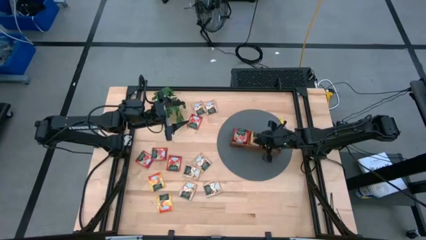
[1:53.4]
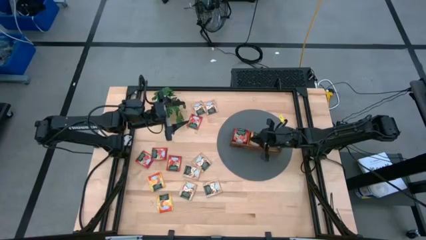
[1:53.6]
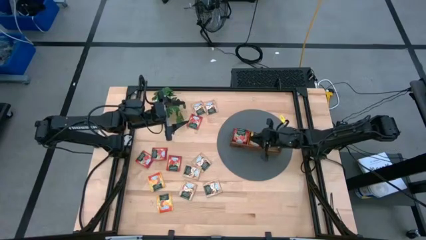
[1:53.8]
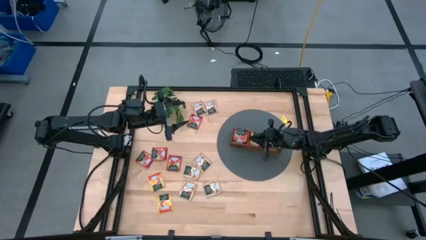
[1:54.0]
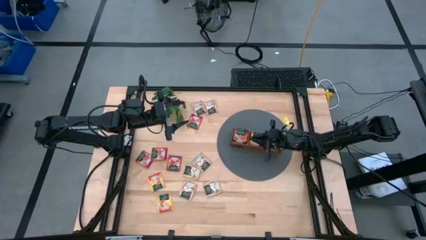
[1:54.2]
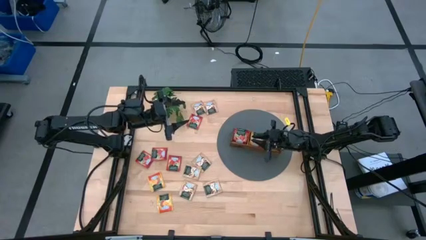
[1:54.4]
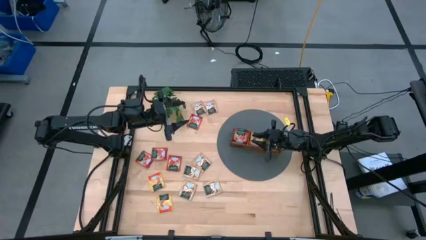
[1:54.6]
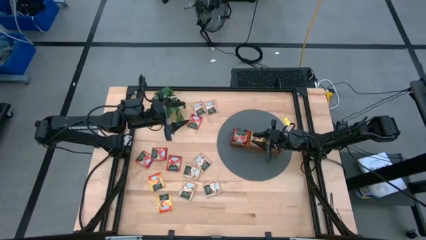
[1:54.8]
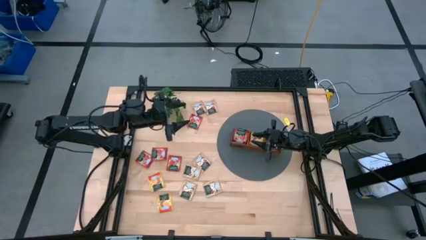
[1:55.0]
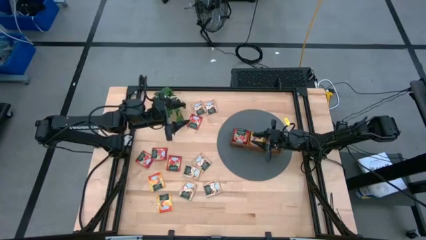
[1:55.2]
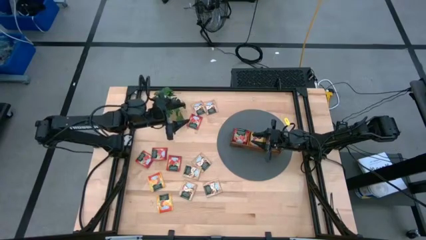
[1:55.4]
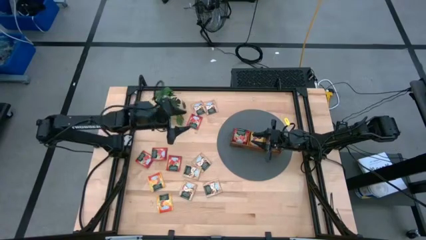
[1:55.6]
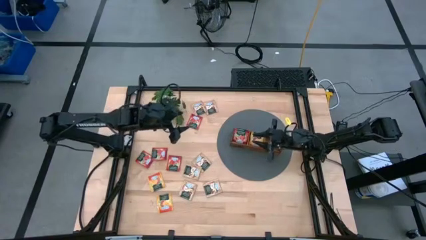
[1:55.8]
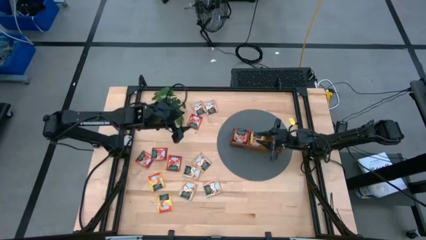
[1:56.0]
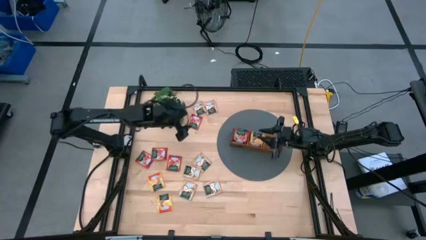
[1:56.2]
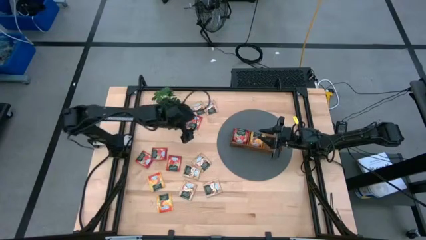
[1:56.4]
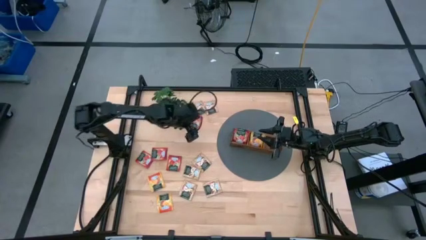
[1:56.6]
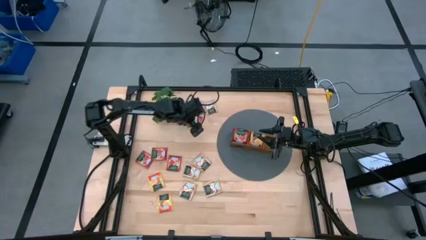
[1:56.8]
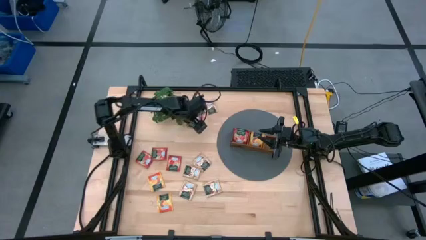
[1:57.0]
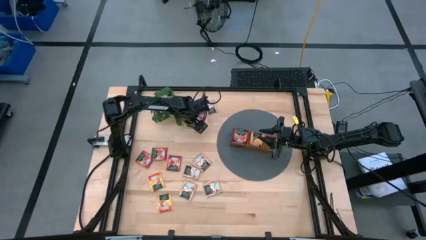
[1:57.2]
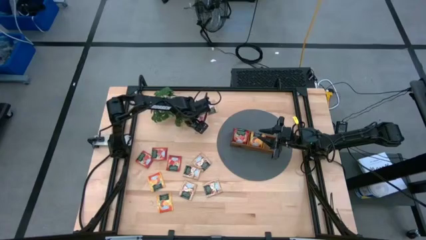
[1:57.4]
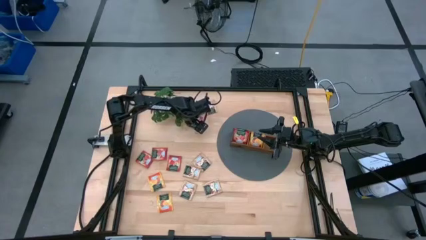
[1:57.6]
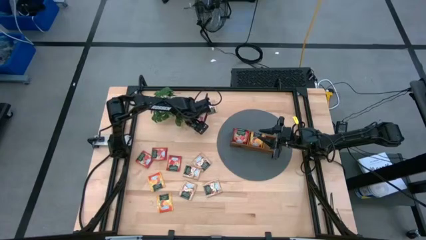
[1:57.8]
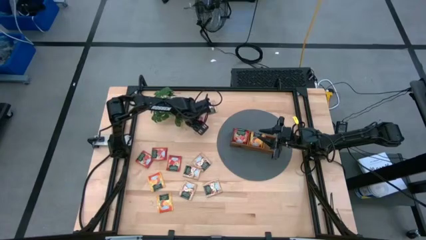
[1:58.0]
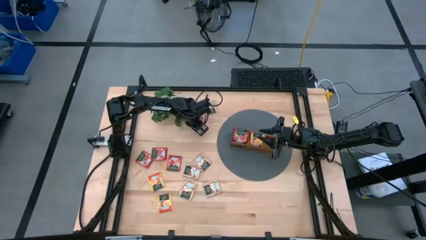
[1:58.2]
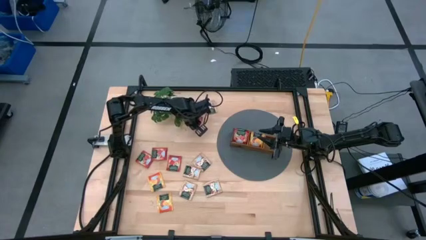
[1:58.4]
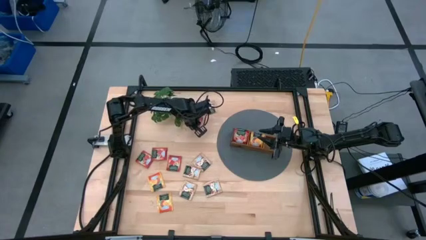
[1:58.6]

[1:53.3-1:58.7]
Task: Pick & Place Tea
Put the red tea bag into the left section of the wooden organizer

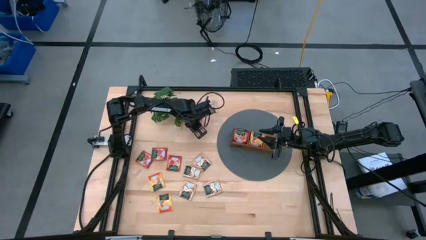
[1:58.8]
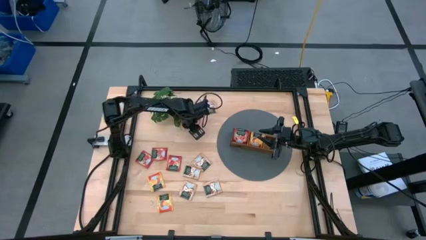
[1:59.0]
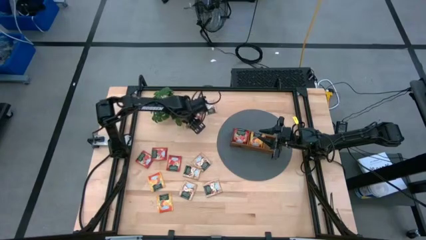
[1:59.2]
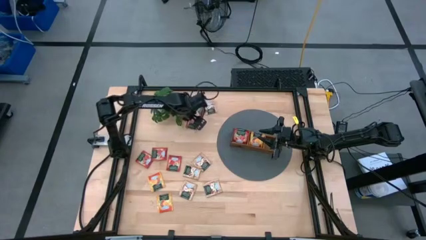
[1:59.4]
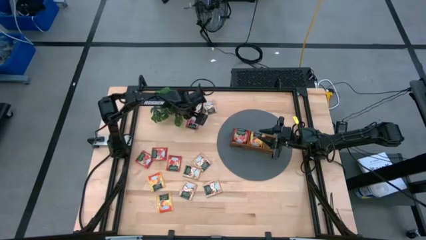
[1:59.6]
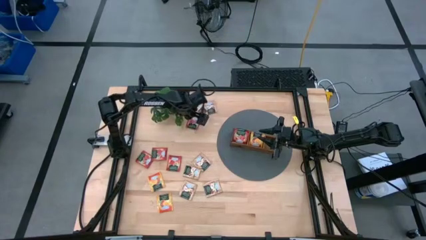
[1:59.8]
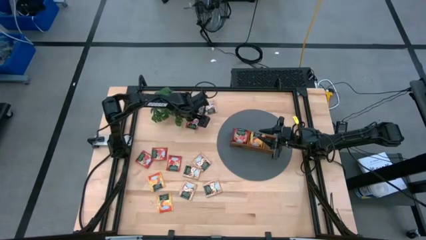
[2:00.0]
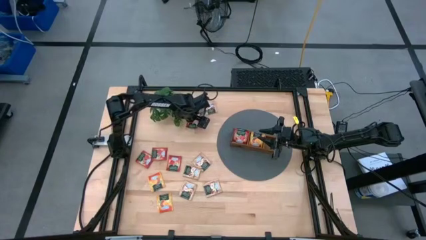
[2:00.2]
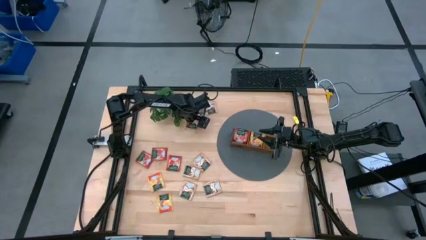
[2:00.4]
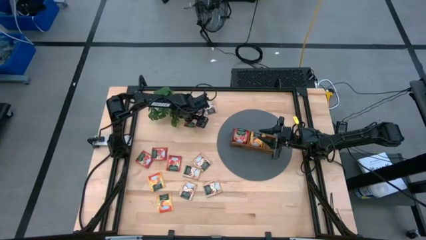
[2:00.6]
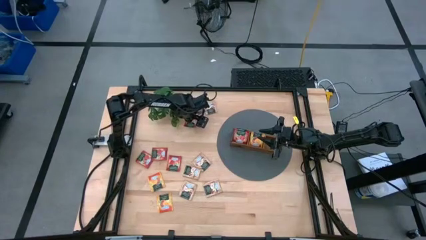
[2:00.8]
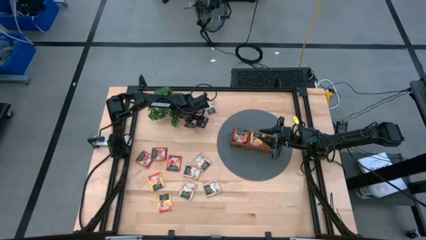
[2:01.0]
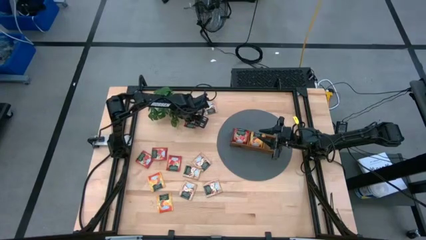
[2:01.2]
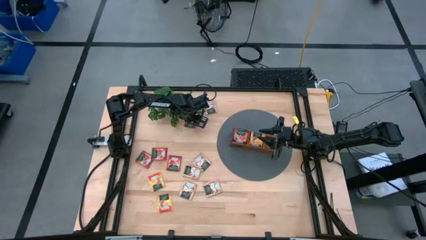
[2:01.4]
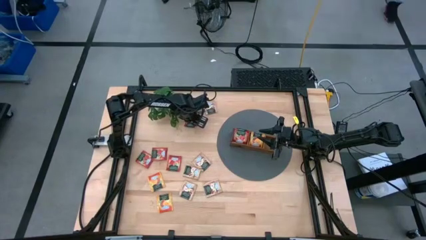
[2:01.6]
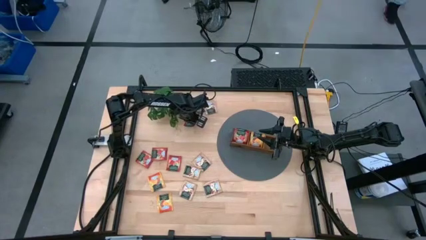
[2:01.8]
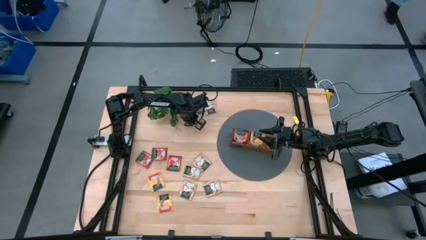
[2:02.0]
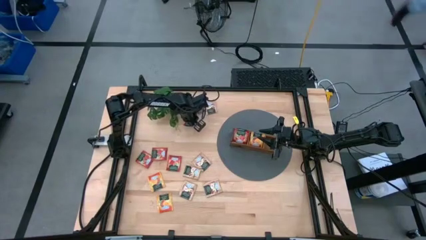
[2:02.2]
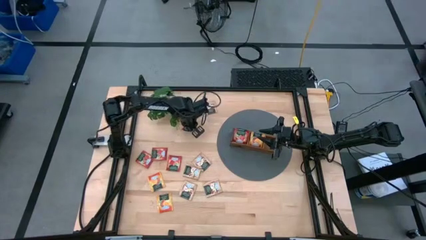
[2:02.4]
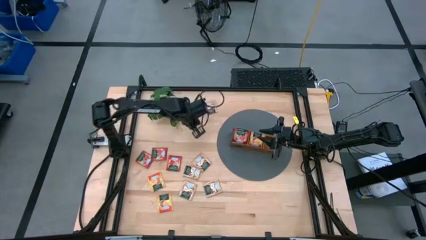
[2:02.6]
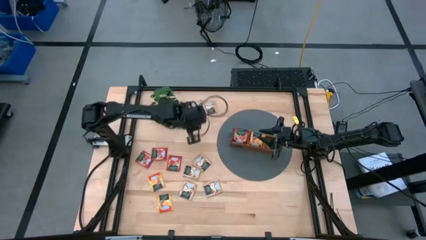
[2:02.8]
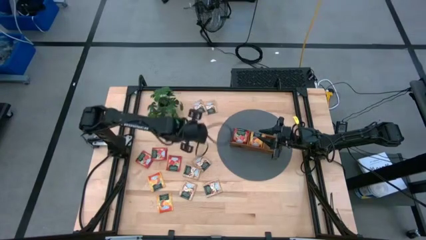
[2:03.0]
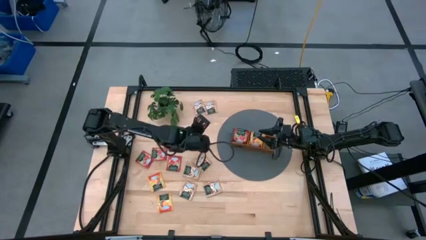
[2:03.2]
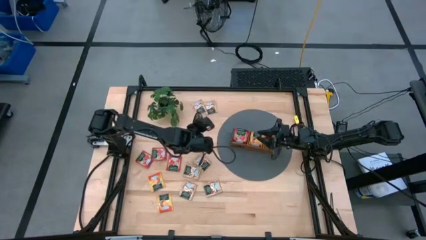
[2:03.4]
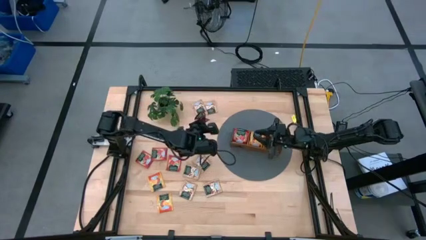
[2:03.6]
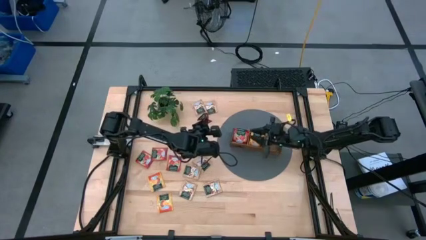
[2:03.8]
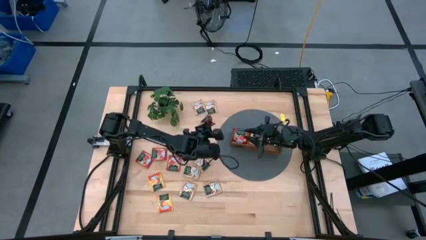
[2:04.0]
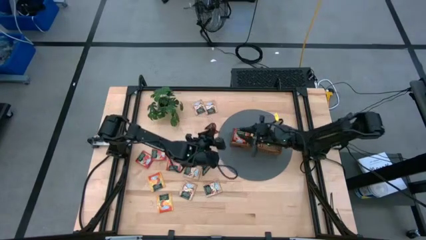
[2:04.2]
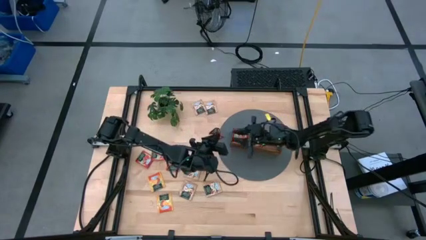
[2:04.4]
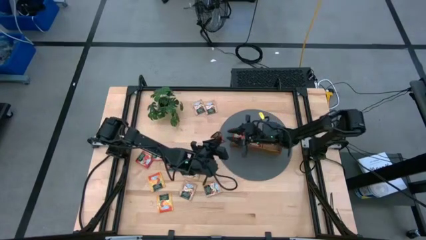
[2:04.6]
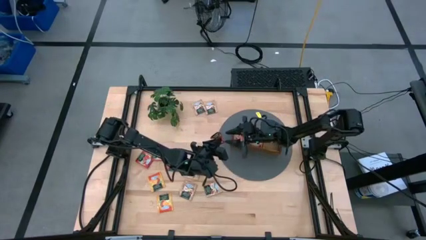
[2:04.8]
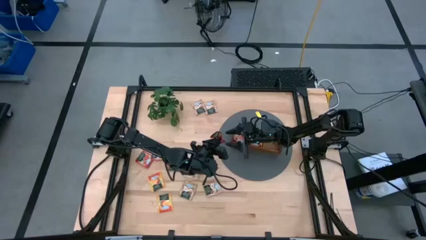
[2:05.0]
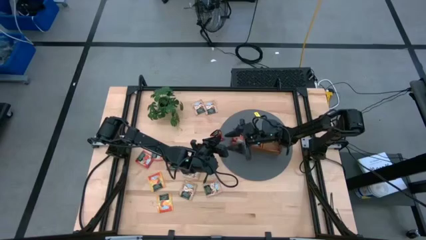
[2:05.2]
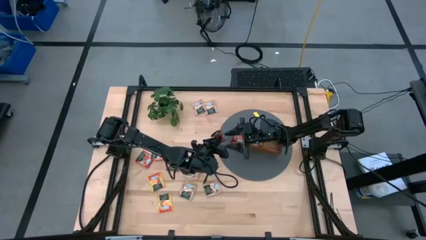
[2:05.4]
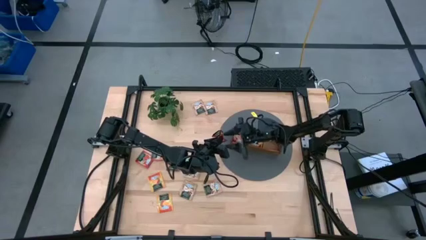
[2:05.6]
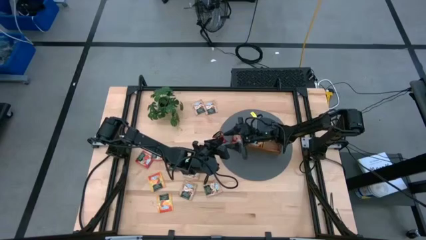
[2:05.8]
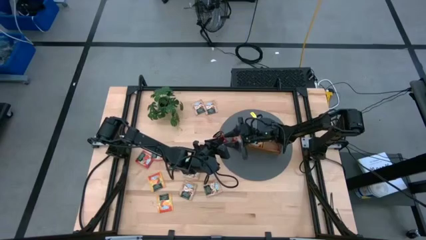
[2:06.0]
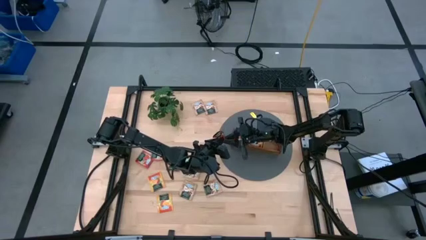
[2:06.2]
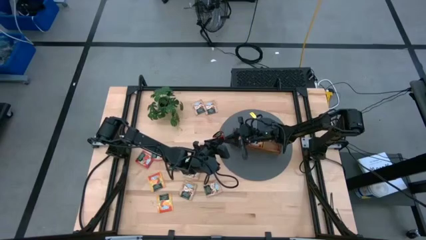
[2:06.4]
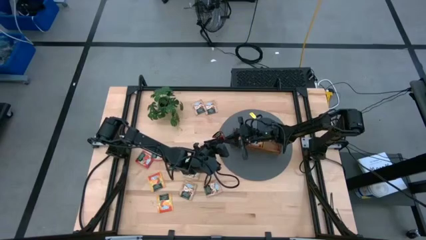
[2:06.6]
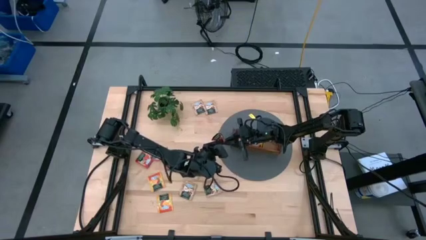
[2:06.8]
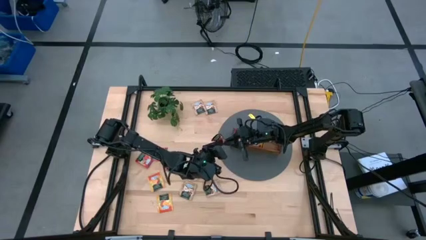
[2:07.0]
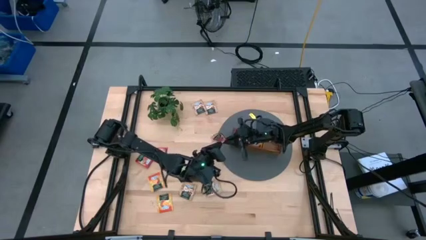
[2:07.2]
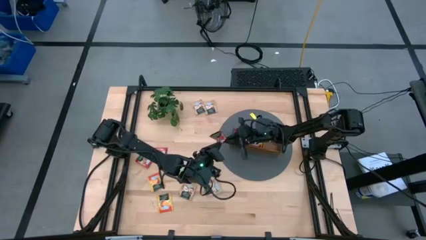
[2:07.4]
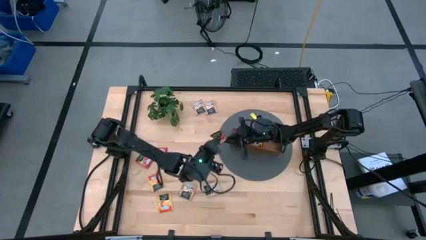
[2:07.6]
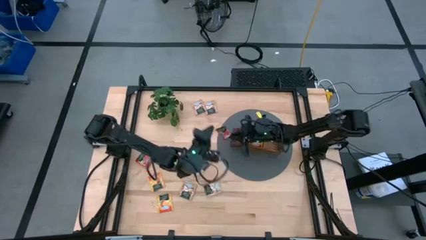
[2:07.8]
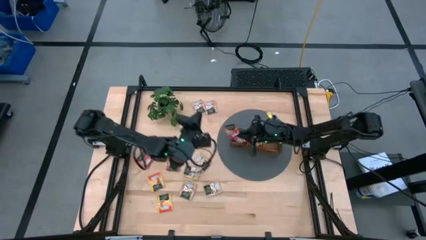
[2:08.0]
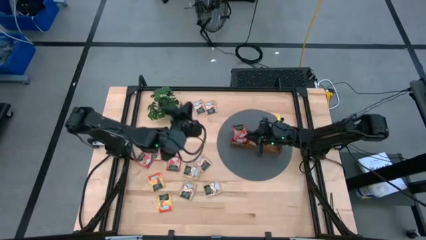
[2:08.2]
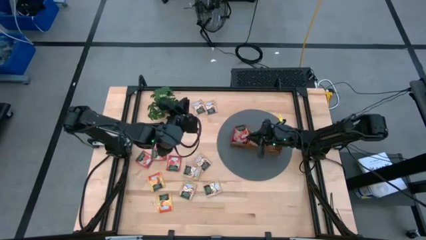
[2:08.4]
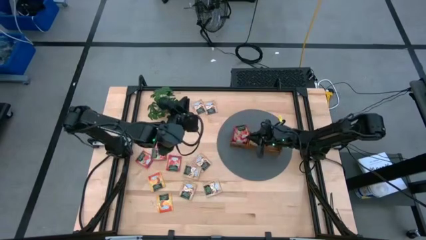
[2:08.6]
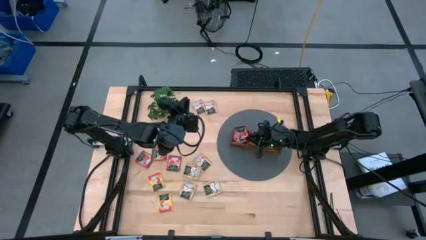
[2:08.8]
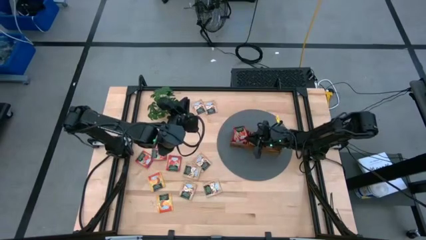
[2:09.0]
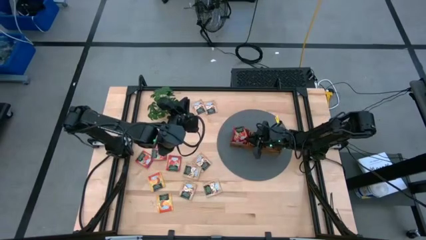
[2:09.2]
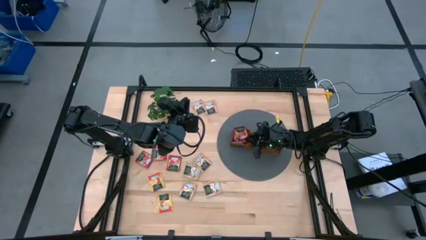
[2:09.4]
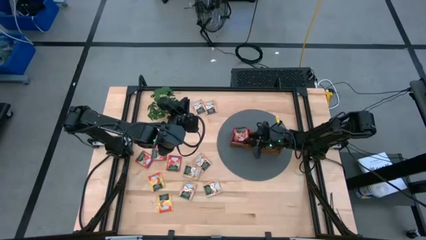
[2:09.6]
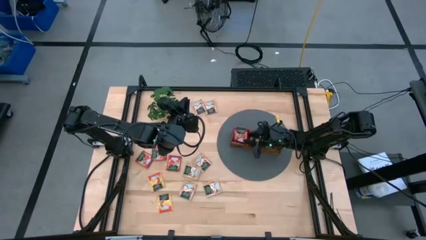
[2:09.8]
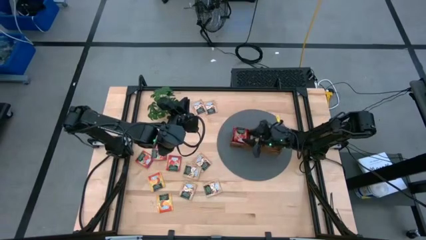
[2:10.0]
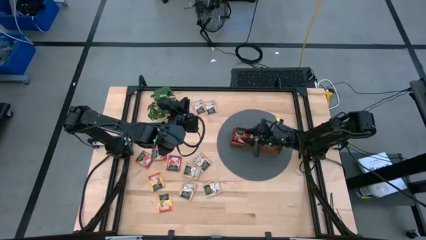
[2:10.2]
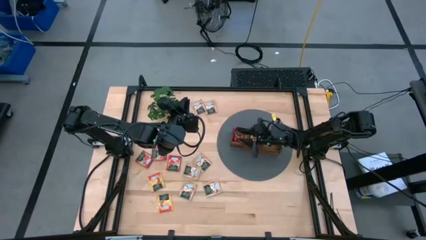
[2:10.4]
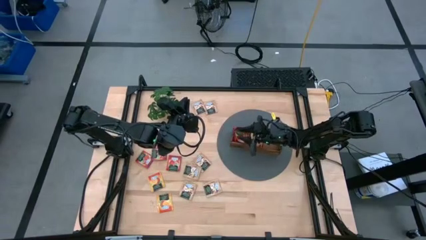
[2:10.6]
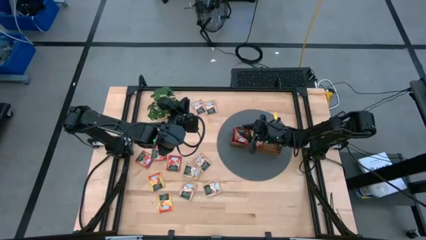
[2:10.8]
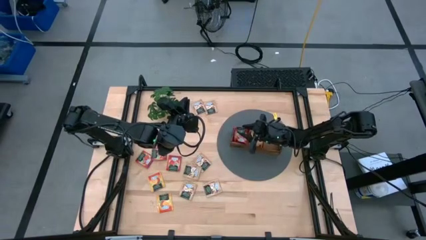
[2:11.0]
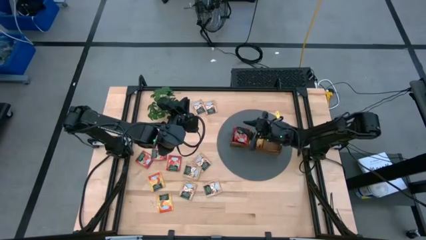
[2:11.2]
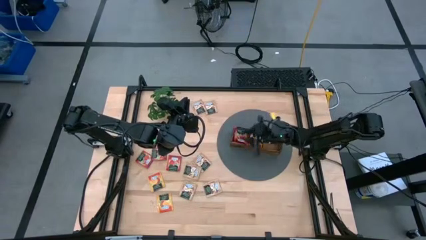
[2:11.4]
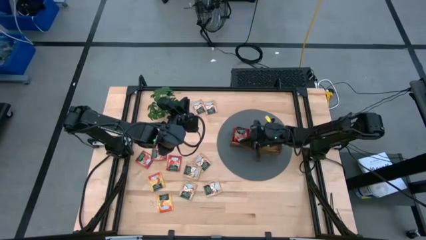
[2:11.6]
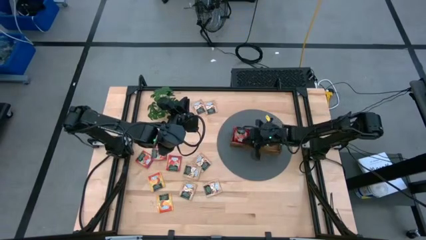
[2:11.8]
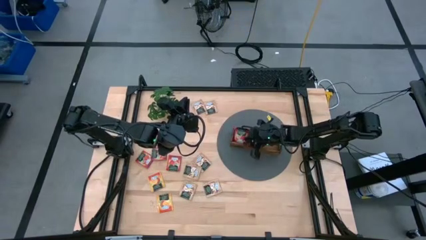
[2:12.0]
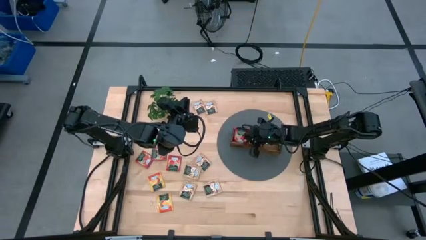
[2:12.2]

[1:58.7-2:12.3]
Put the red tea bag into the left section of the wooden organizer
